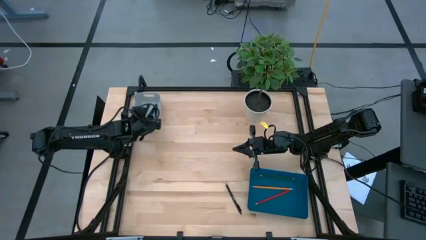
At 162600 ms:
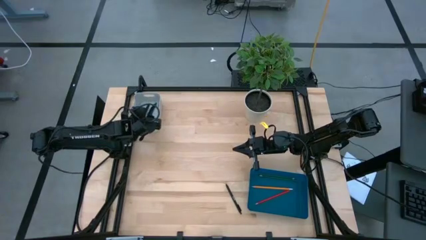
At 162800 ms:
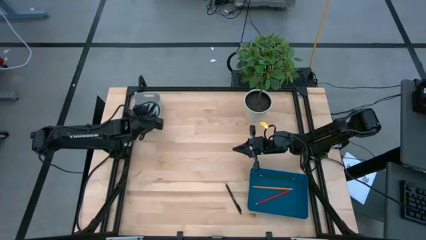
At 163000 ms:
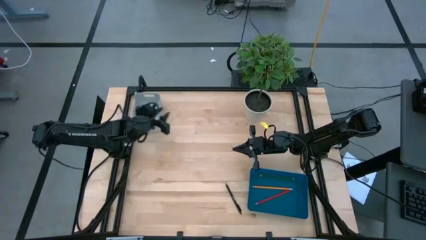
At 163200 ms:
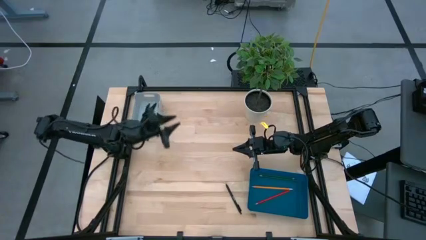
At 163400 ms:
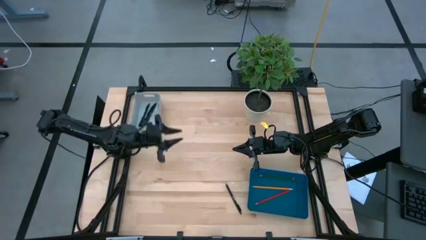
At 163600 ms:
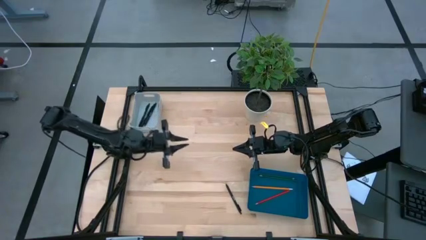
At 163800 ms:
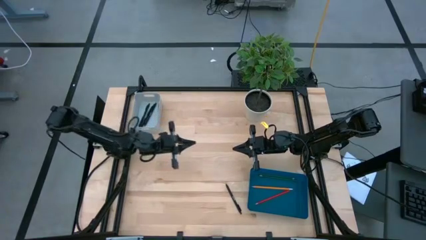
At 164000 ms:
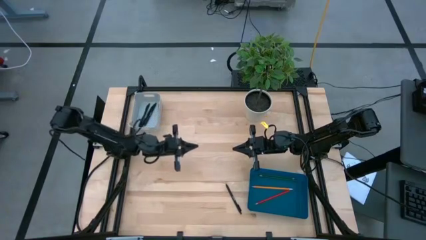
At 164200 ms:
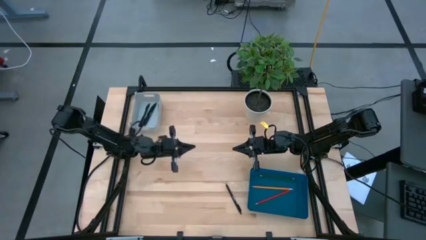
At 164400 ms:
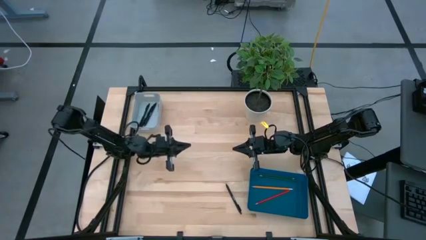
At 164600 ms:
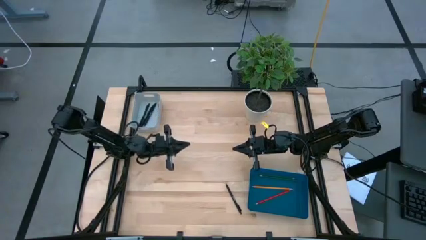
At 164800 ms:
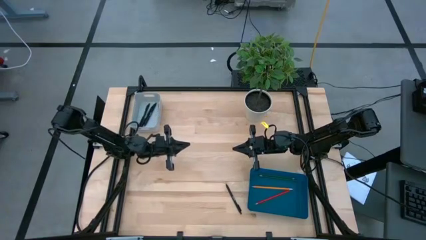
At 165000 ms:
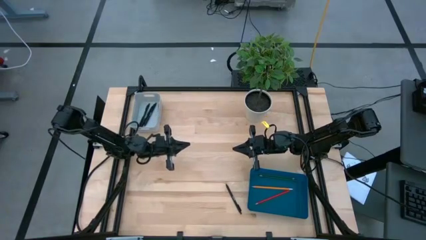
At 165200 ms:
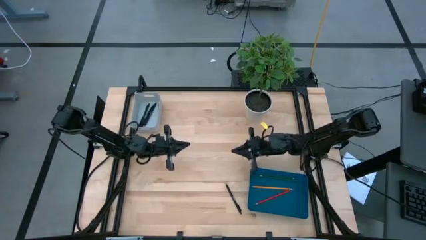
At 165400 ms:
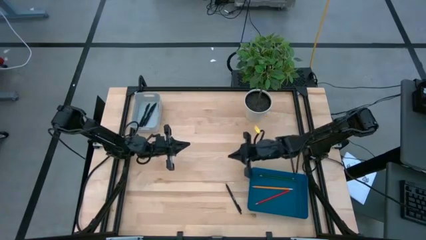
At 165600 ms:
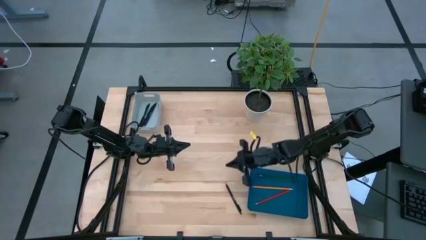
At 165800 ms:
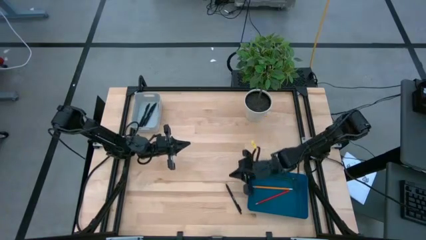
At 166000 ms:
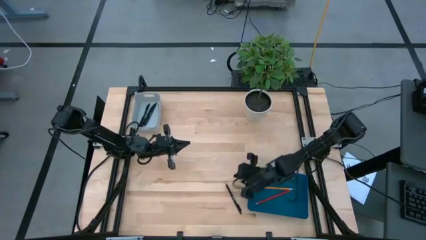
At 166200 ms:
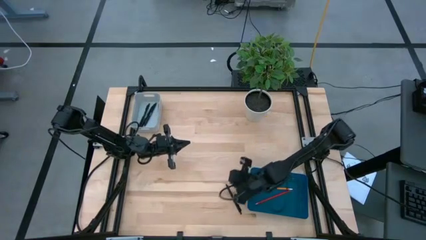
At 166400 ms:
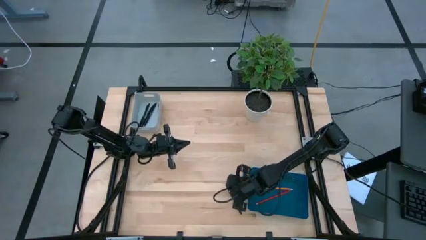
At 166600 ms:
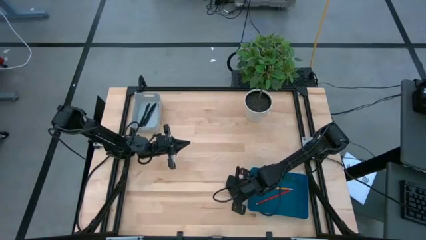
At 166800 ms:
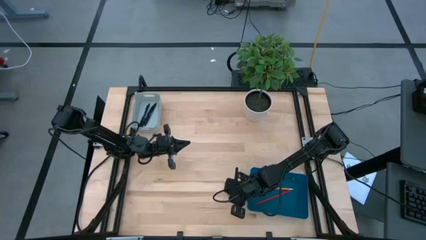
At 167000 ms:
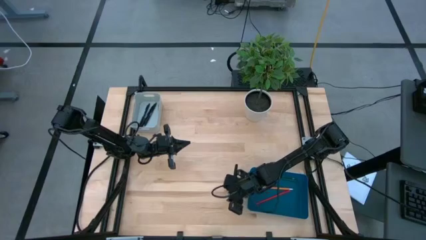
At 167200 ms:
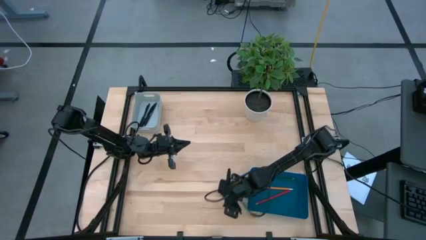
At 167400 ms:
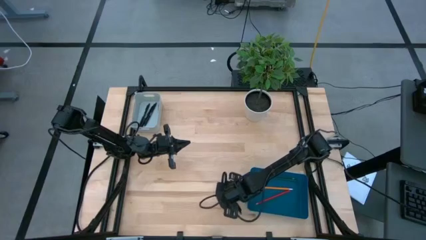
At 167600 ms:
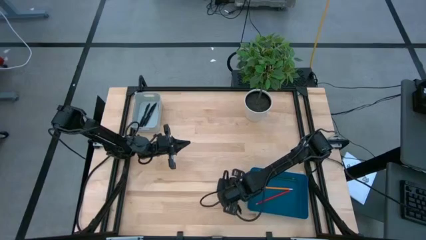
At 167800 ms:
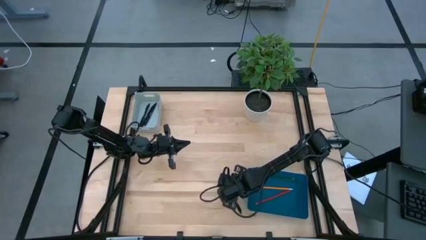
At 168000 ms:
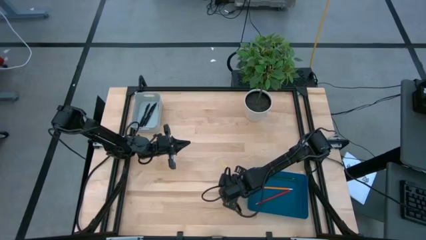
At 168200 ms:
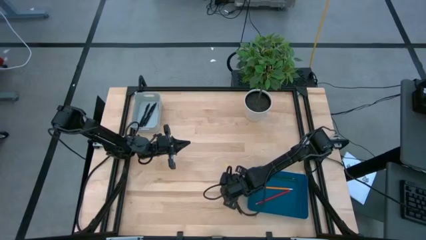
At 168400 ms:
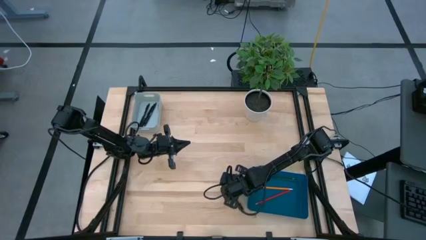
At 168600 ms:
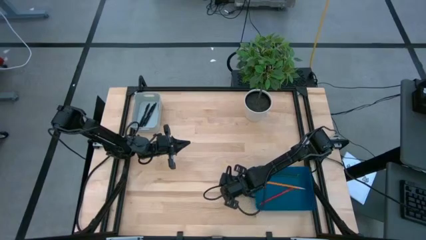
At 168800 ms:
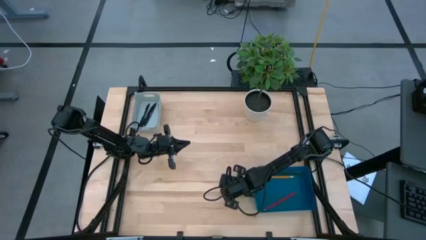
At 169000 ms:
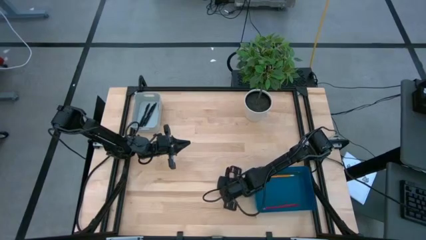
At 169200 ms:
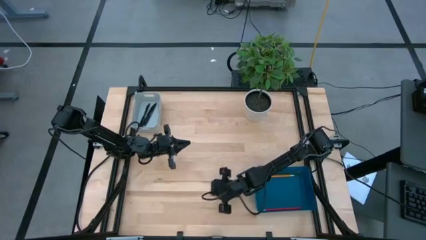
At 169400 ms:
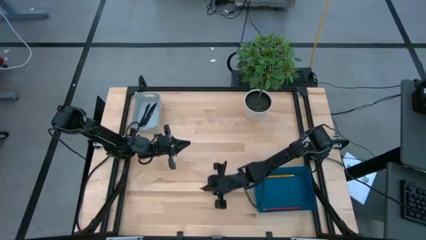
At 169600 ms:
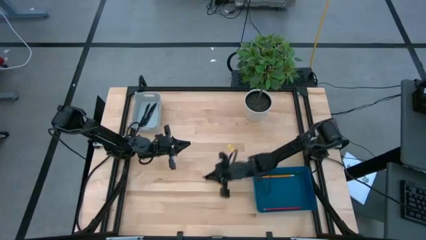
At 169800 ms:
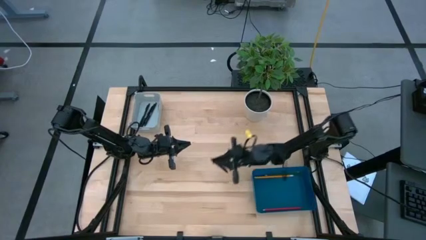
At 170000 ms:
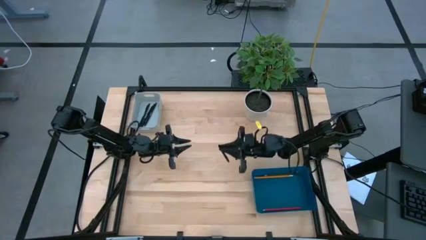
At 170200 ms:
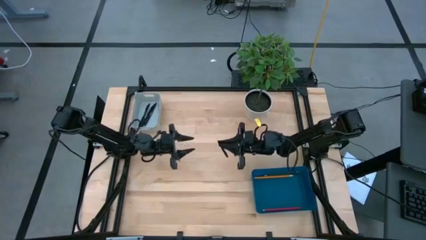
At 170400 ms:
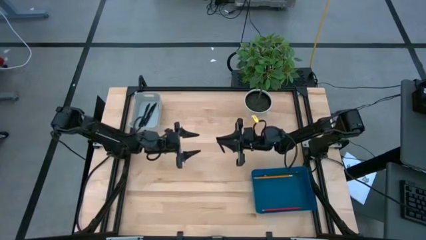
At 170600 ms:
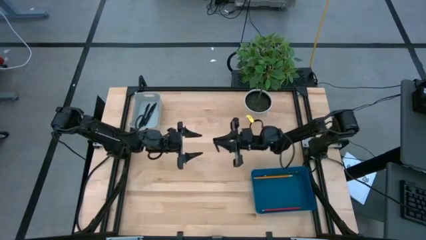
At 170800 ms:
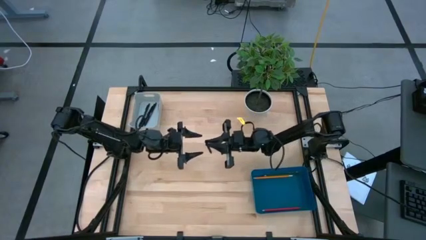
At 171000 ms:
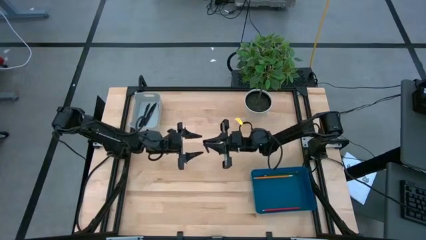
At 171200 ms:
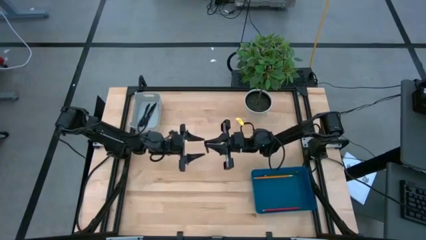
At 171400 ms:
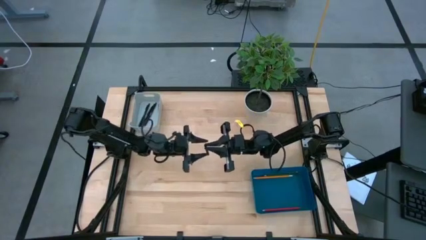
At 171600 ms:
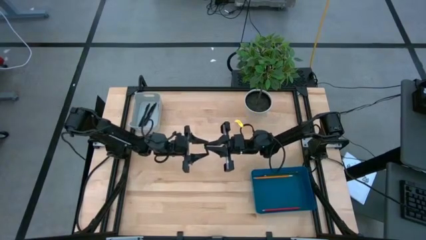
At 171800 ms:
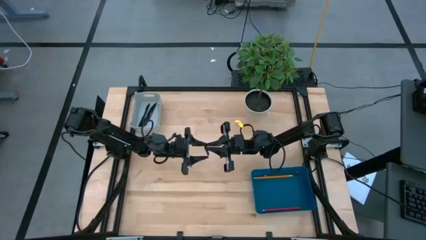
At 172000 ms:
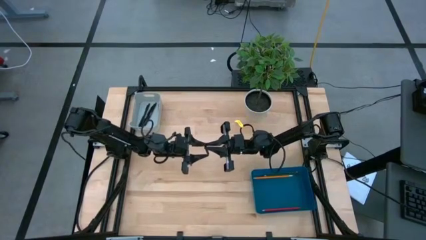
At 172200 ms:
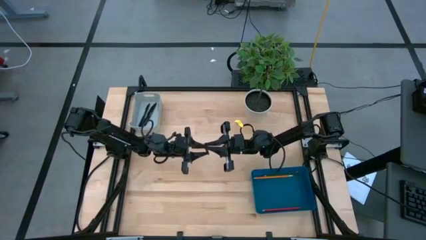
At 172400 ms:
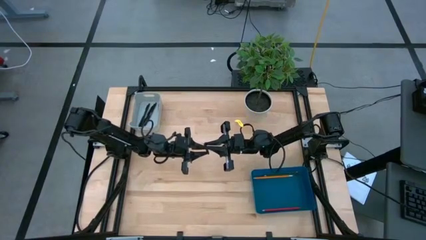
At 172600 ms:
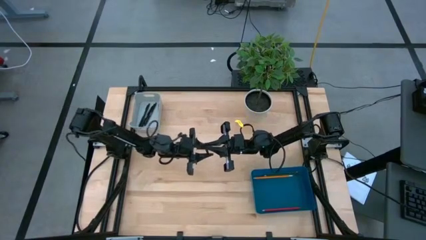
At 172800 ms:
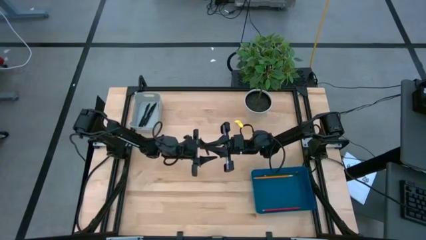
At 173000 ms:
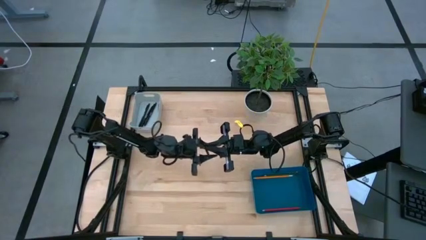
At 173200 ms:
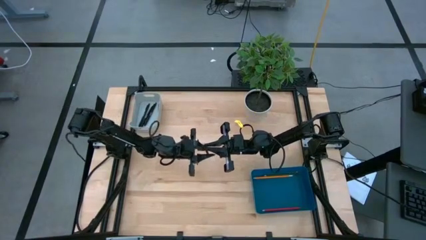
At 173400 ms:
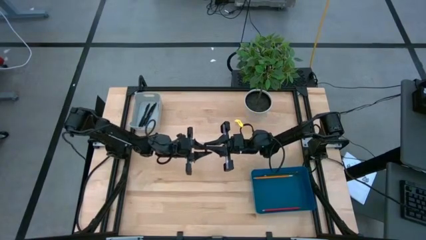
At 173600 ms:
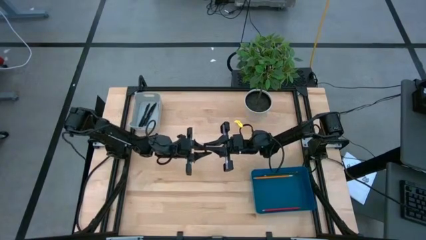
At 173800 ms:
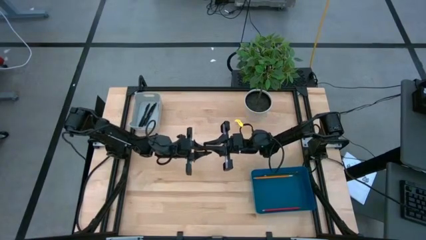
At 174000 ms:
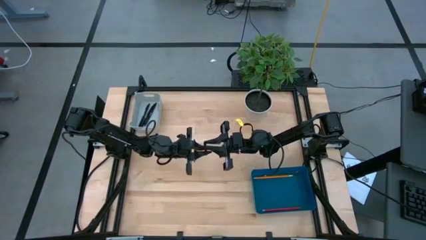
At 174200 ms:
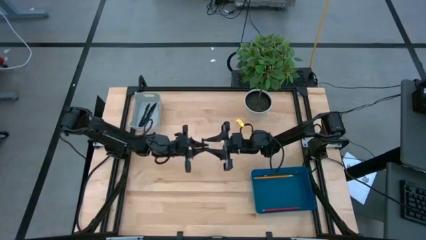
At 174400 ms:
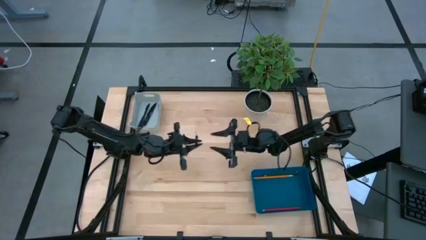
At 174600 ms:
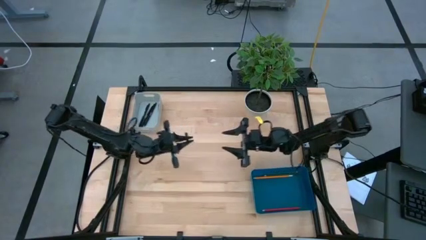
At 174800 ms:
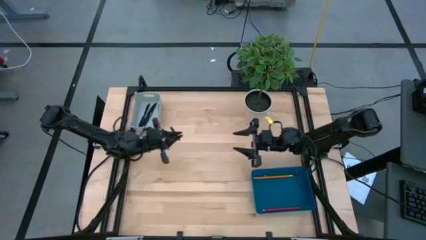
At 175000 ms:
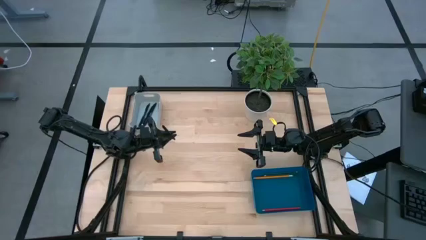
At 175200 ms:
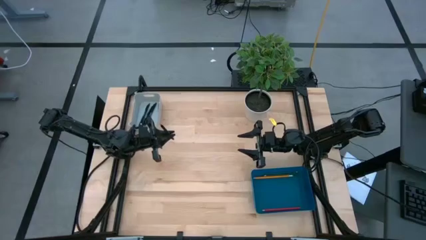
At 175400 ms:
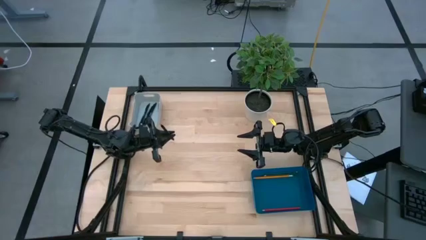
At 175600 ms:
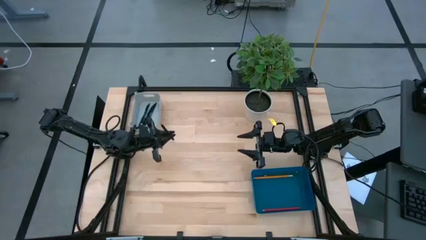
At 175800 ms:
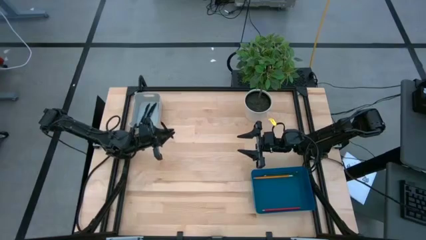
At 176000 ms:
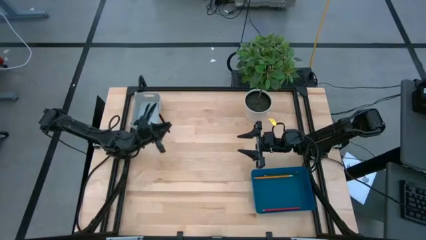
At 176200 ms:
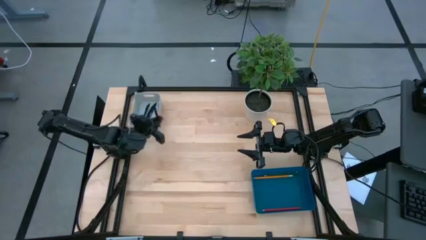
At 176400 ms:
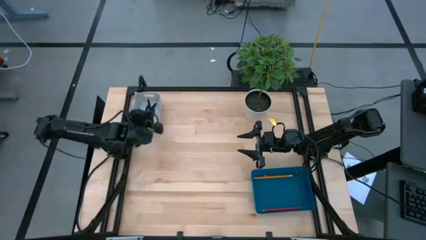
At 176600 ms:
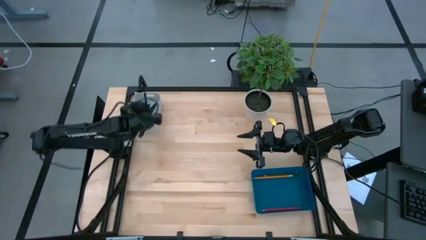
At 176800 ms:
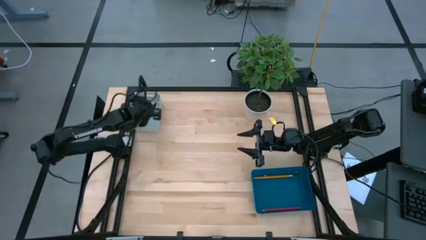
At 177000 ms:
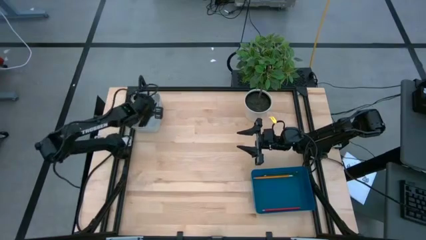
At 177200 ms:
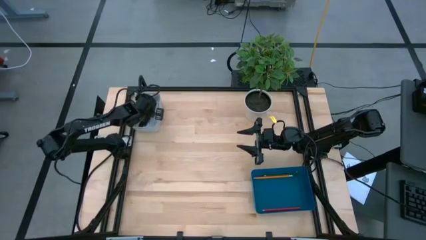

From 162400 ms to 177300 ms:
Task: Sort pens & pencils
Put the black pen into the white bin
